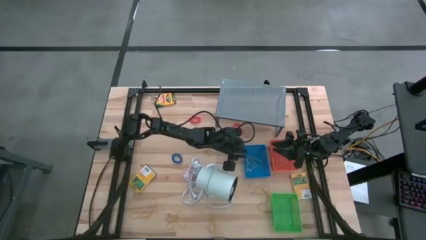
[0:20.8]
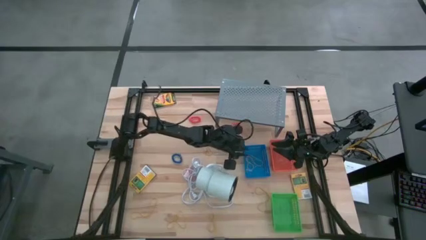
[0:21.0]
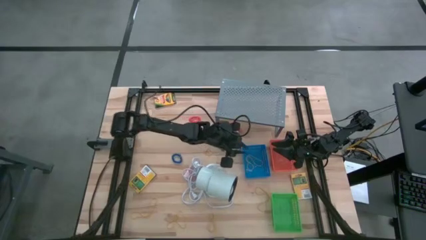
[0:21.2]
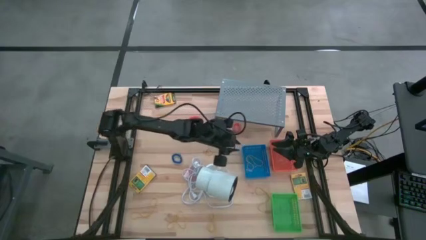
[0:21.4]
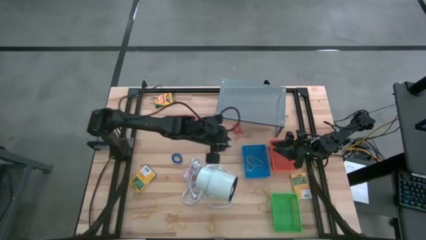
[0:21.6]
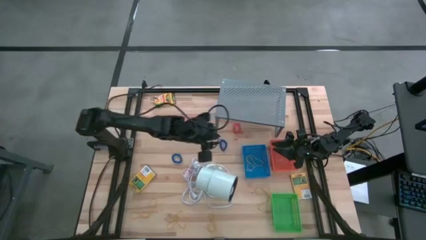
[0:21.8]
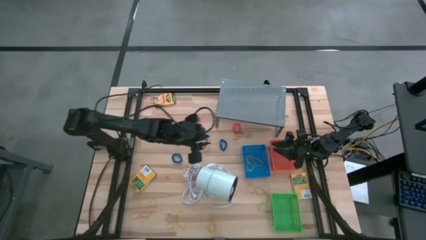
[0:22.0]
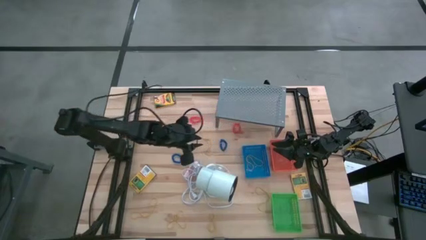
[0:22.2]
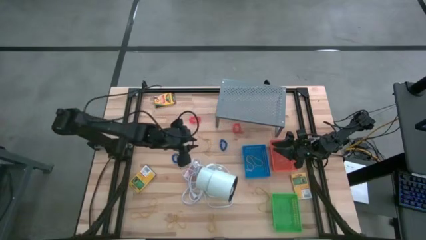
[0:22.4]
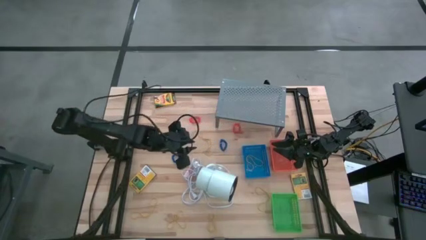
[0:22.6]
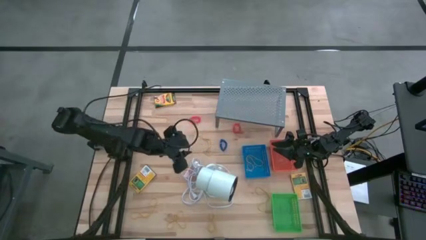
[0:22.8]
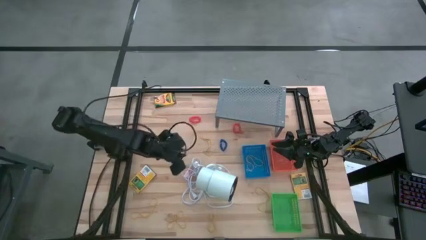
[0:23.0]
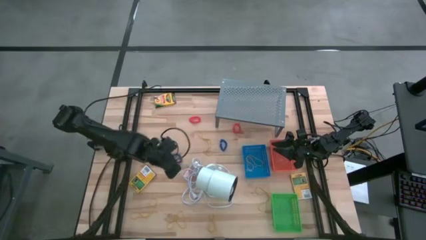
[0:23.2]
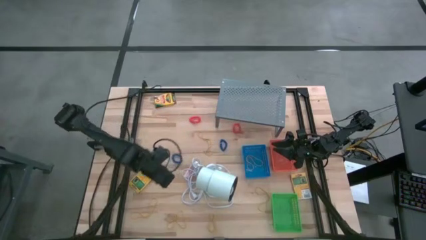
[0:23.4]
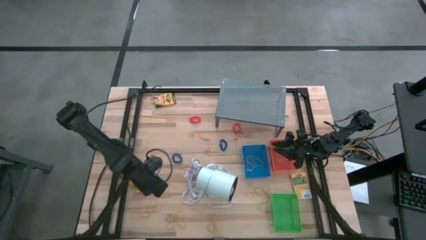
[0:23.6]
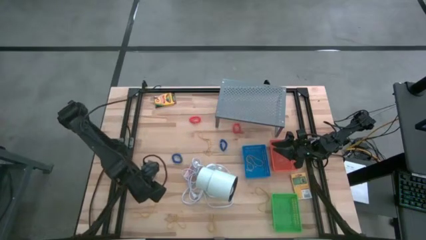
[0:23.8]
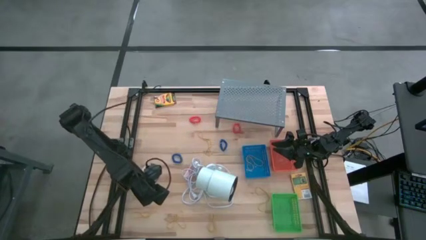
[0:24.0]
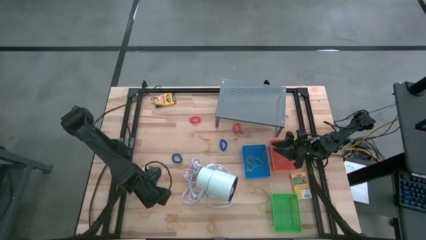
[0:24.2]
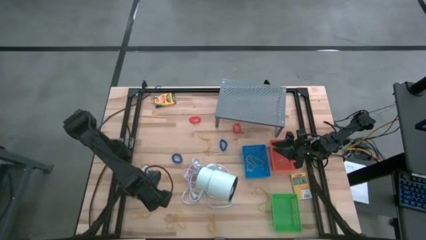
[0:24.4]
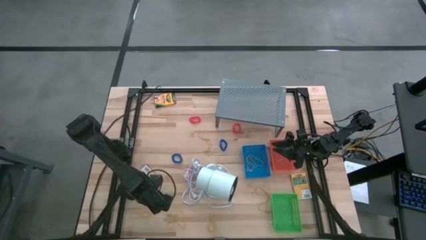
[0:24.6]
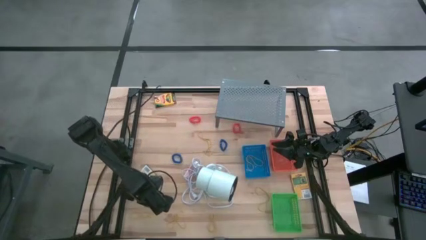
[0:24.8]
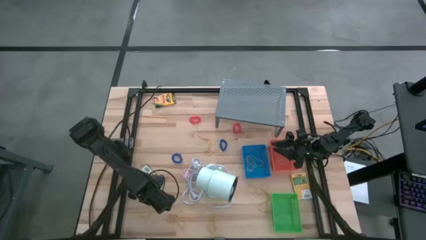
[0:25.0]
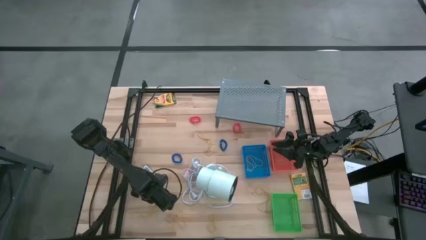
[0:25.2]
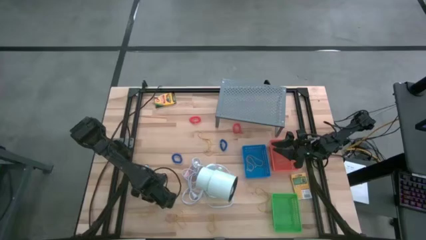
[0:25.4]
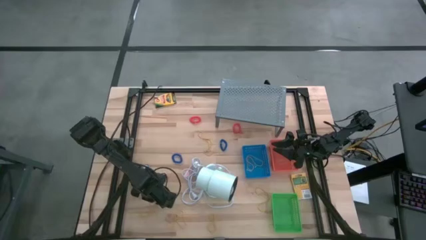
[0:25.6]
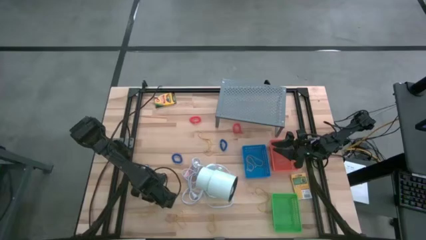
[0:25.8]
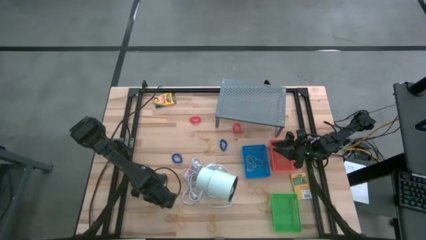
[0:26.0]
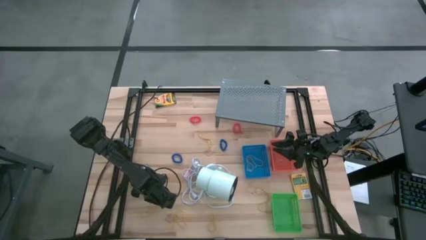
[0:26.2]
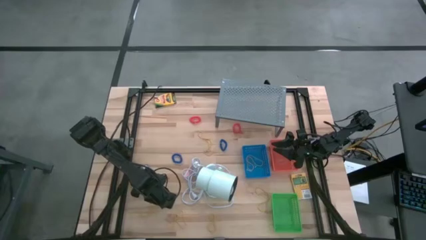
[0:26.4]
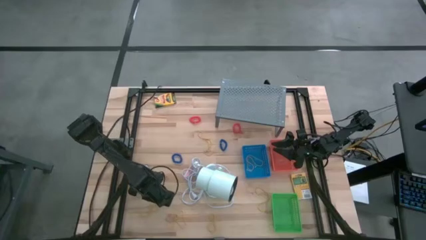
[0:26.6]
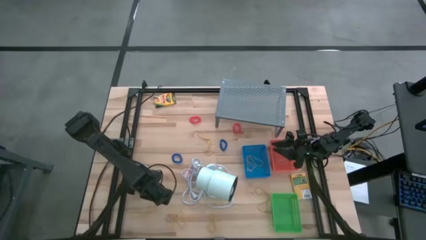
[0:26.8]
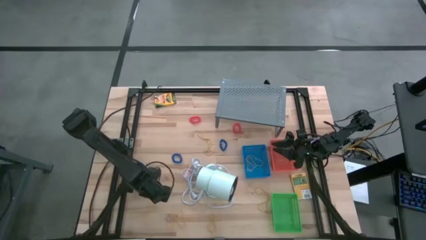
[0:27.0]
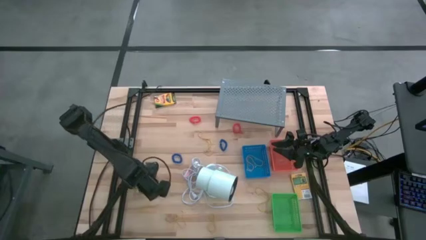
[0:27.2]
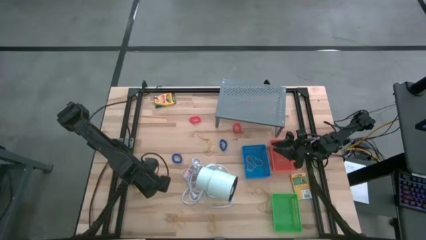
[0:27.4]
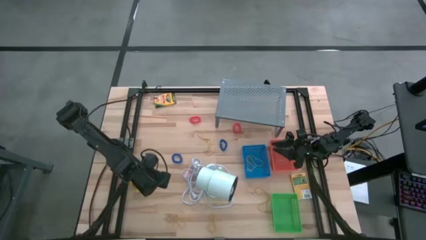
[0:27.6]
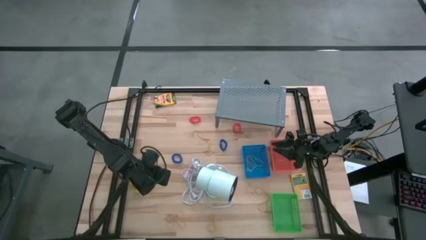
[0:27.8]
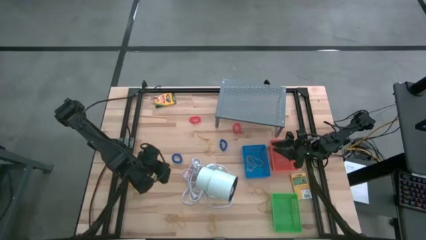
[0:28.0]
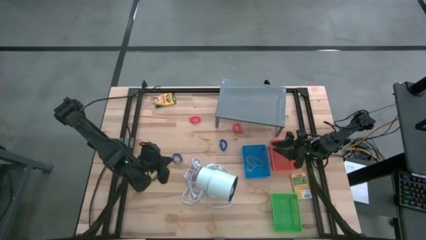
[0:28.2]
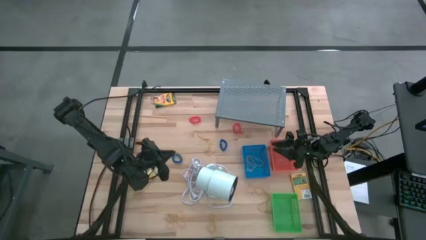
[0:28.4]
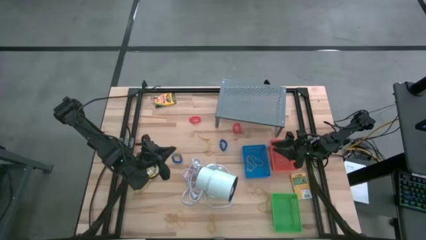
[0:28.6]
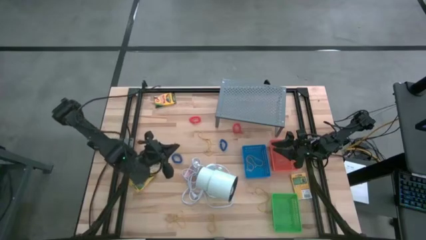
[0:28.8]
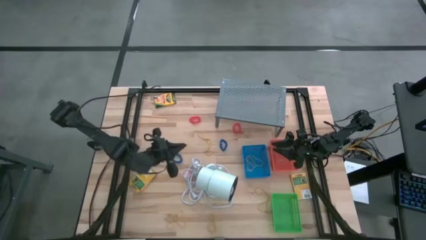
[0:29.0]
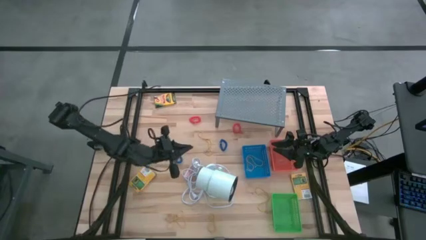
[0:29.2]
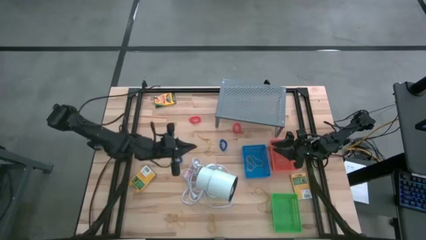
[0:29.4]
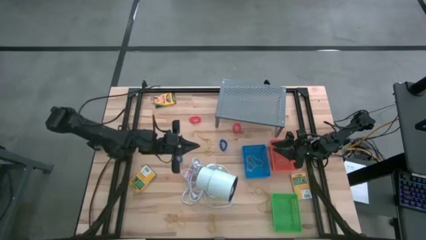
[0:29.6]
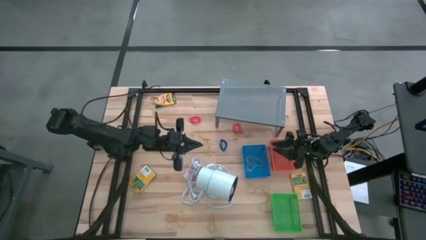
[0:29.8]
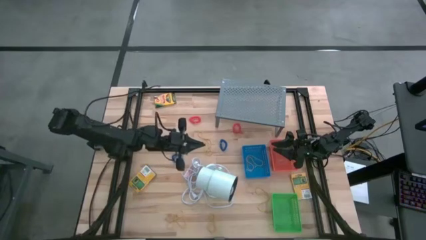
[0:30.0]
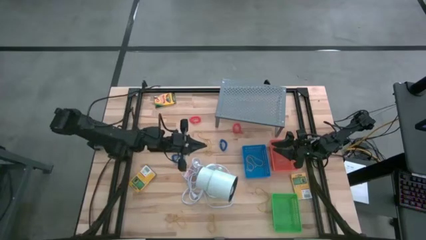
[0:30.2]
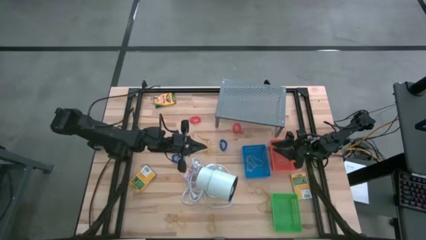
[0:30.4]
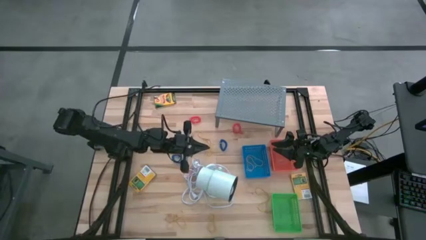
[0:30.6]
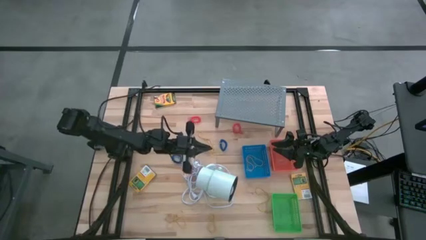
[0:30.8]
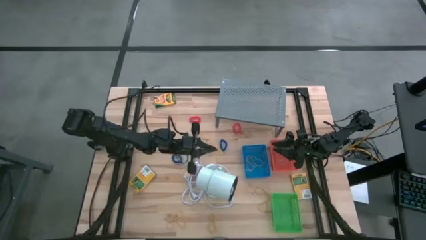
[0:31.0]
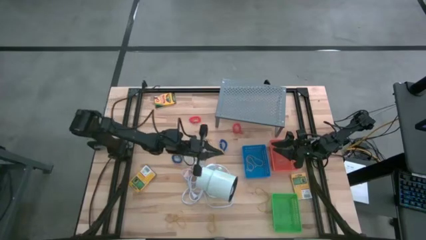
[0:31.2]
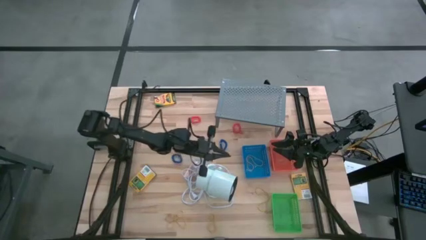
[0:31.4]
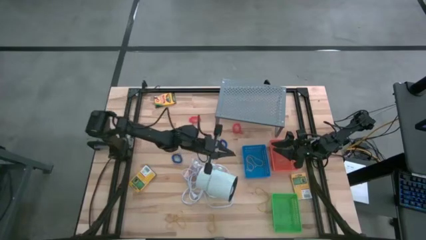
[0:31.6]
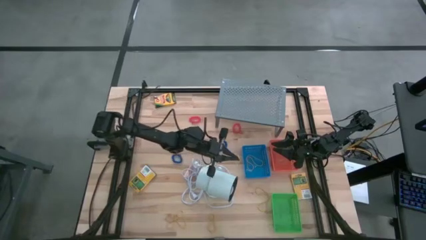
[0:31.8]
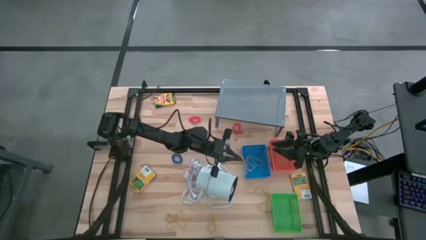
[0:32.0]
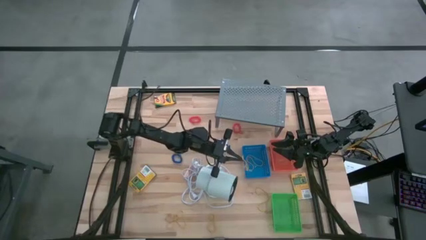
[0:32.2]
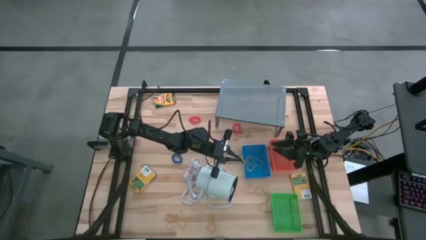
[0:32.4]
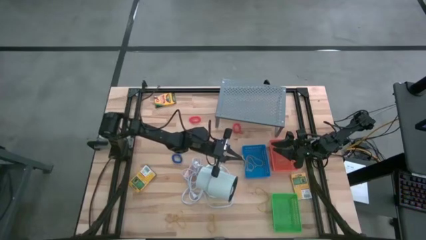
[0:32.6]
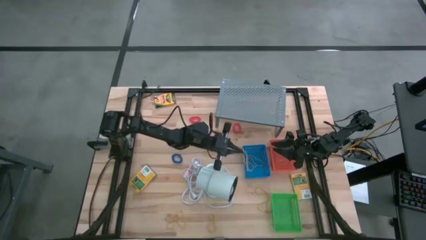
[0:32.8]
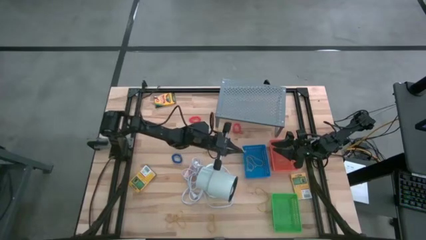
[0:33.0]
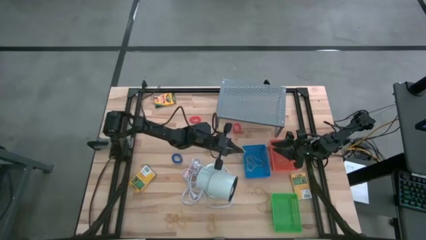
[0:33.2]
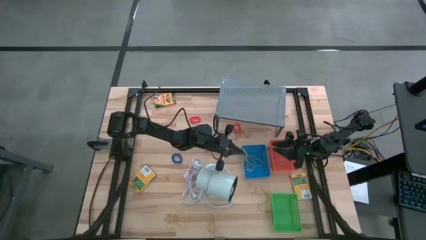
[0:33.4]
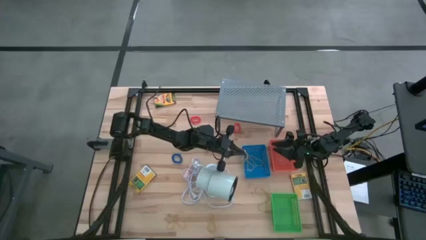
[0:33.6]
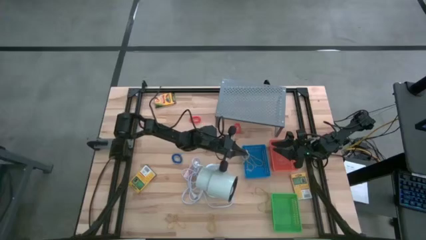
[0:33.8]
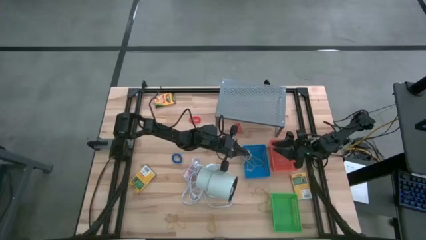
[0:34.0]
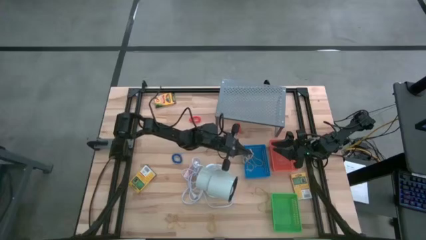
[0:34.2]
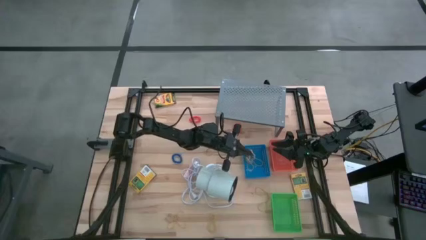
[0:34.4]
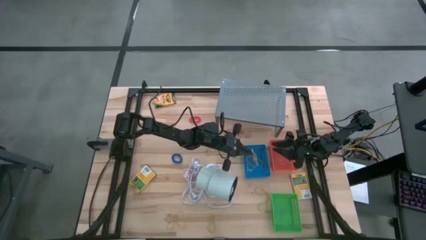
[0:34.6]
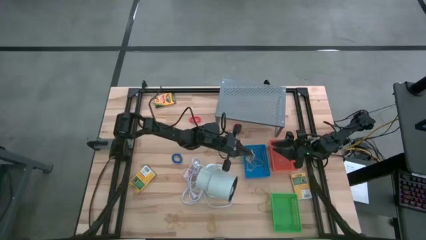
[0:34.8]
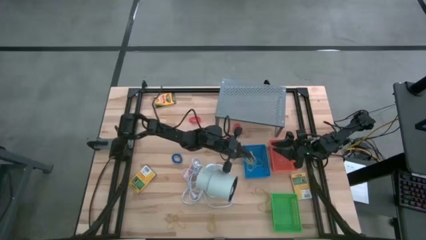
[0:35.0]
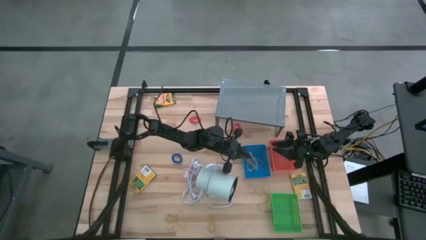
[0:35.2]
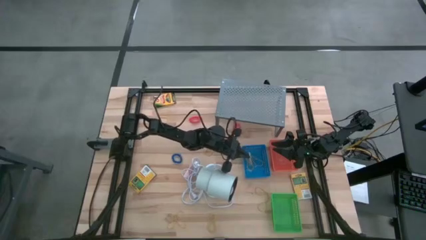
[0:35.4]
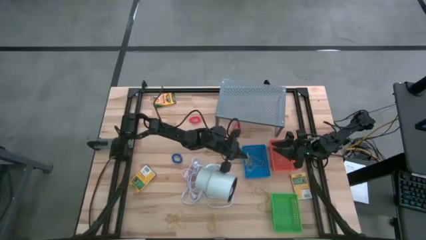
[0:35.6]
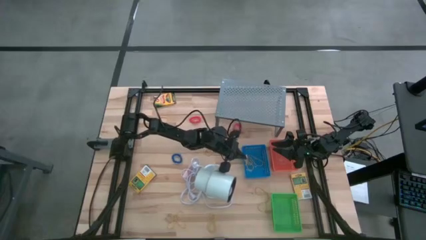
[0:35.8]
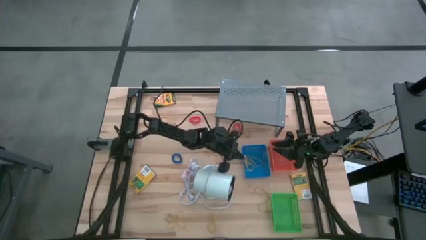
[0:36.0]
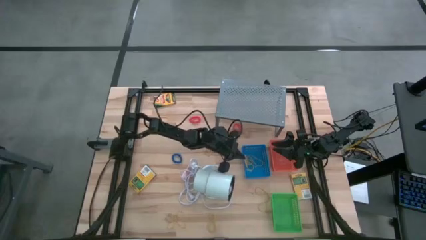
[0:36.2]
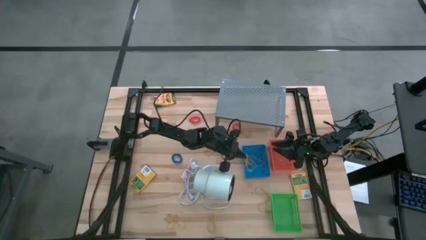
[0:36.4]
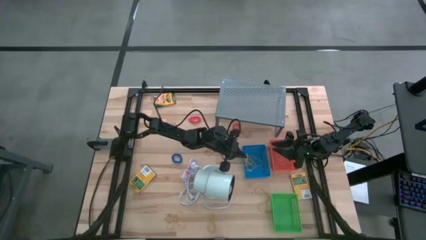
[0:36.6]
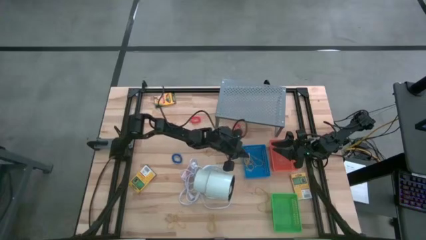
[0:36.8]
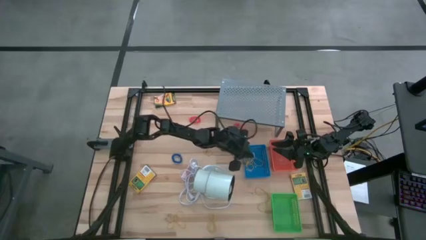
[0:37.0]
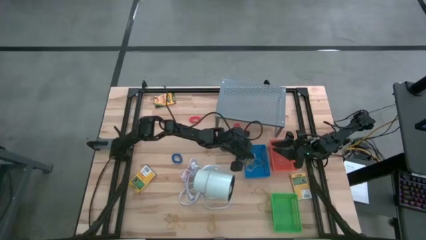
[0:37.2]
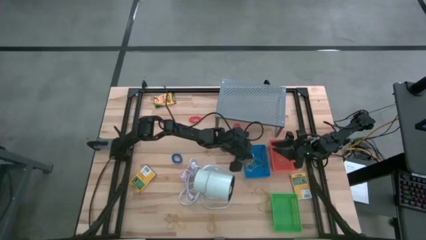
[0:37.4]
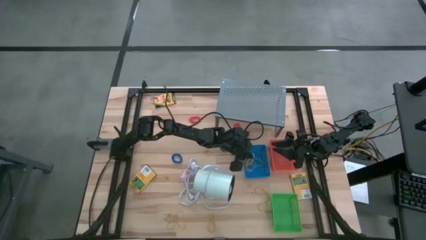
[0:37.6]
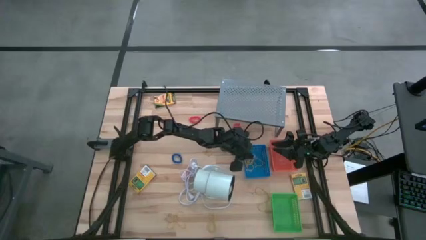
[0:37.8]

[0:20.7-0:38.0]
Task: Pick & Place Office Desk Supplies
Put the yellow rubber band into the blue bin
